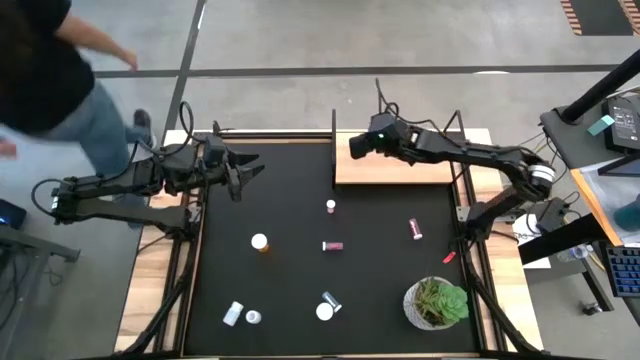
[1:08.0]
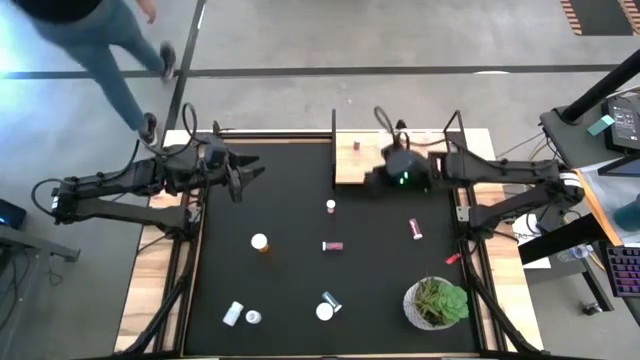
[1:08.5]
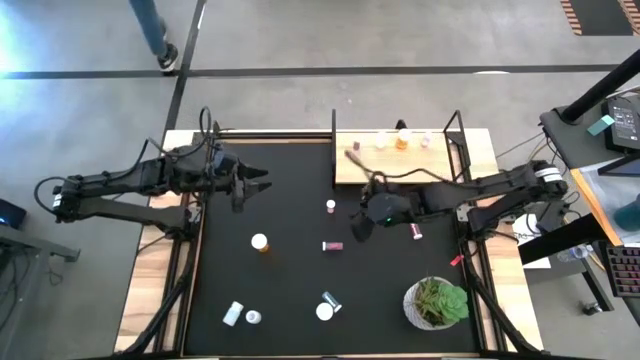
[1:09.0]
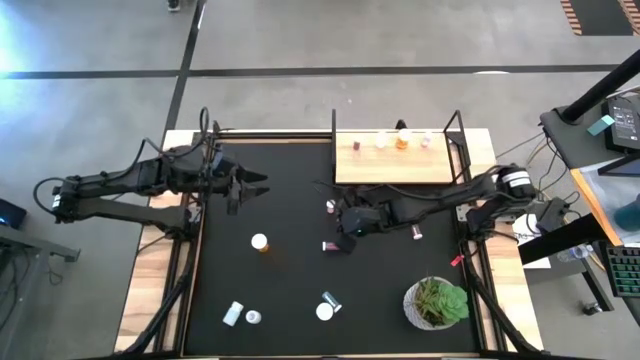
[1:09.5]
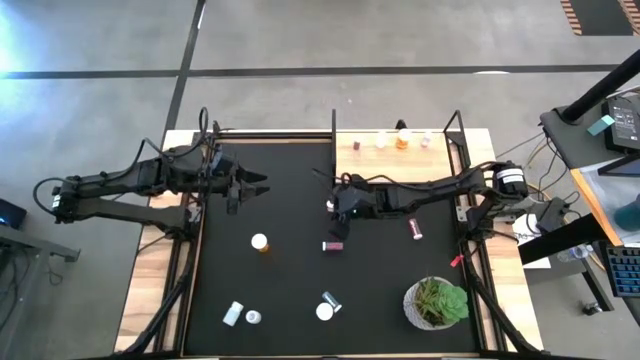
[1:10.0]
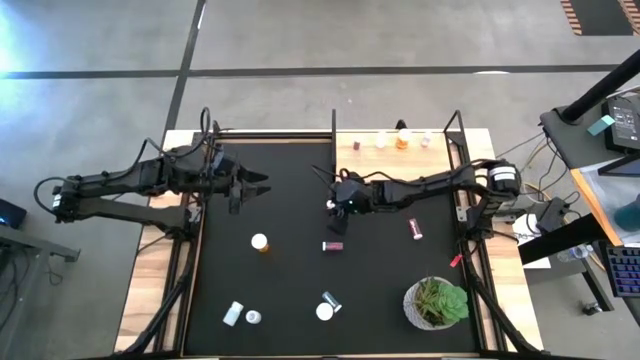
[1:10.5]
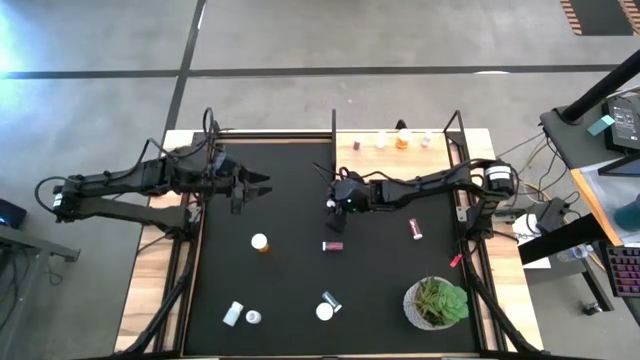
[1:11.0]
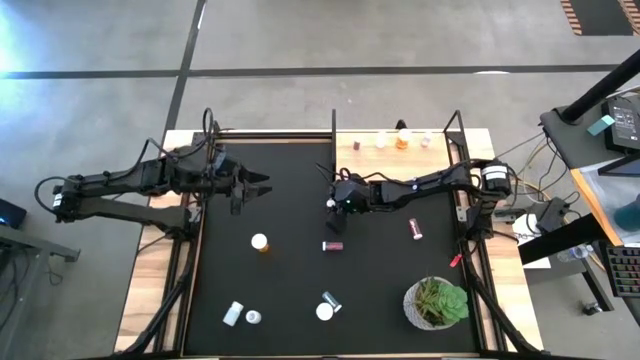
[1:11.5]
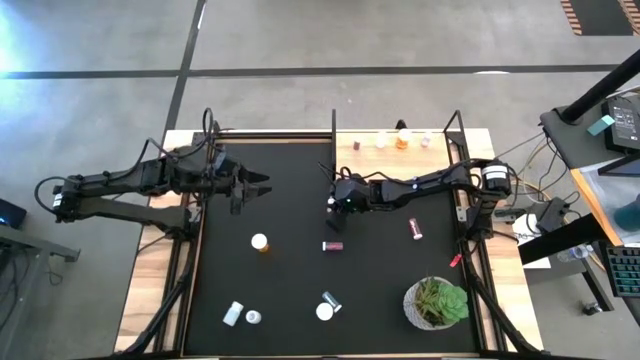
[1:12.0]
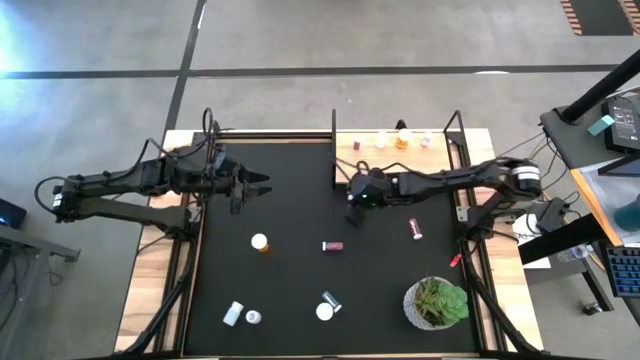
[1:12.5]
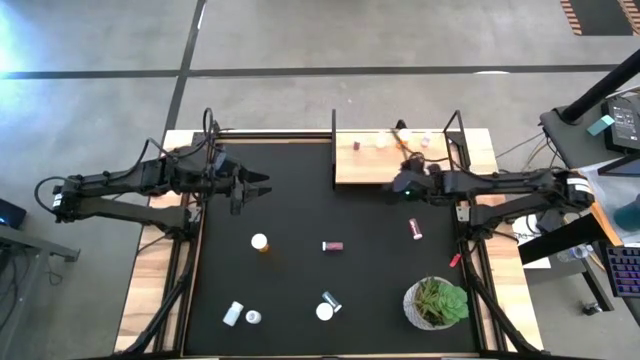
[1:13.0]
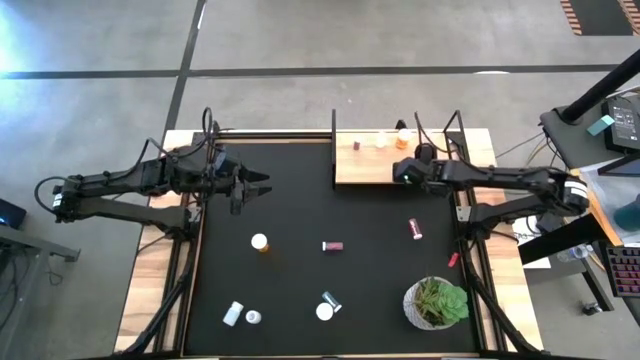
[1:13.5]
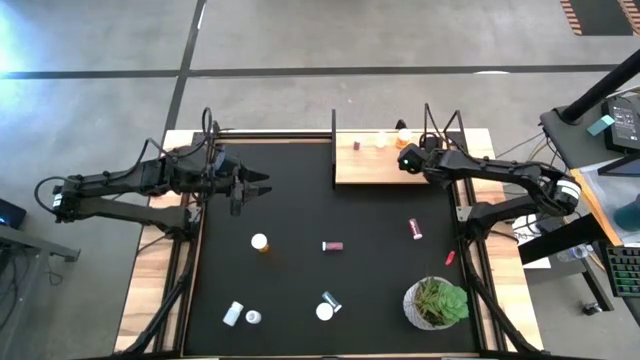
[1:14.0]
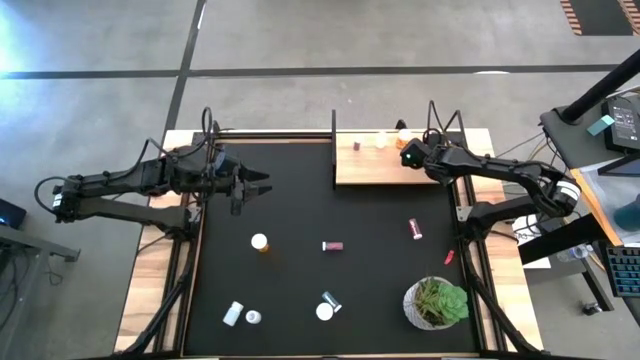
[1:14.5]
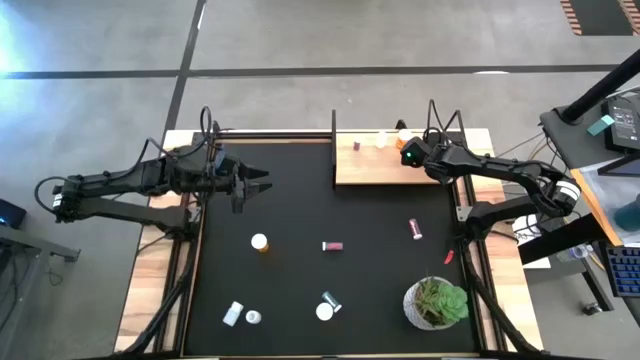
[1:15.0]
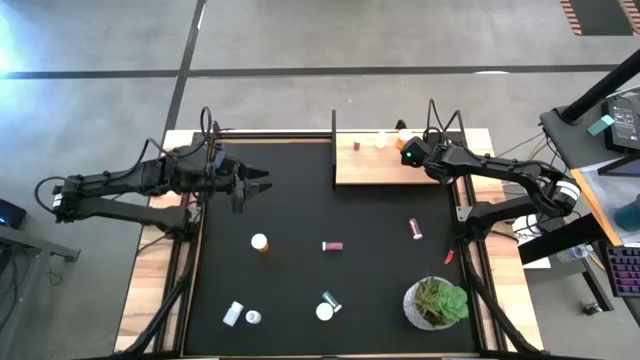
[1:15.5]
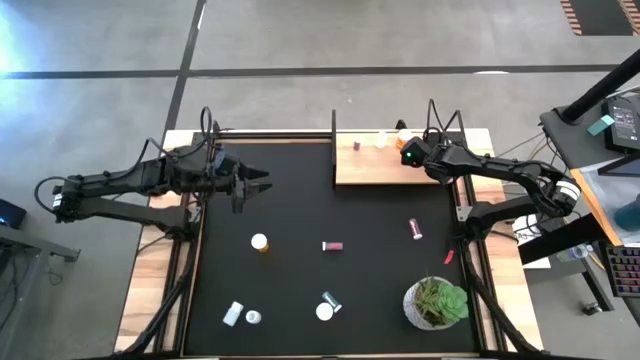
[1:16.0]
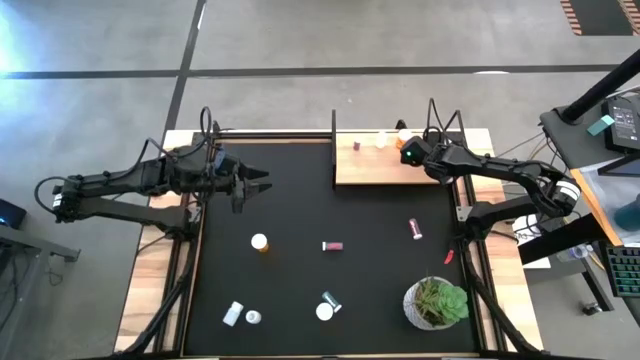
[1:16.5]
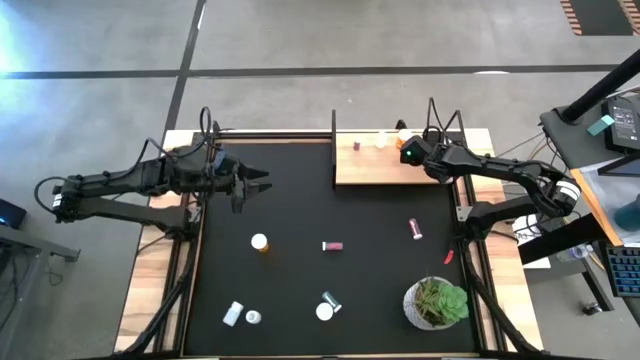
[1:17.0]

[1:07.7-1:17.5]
Task: Pick and place medicine bottles onto shelf by color
Put the left pink pill bottle on the shelf aligned with the other pink pill bottle

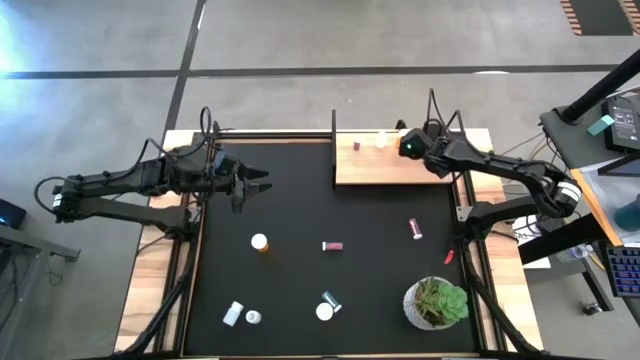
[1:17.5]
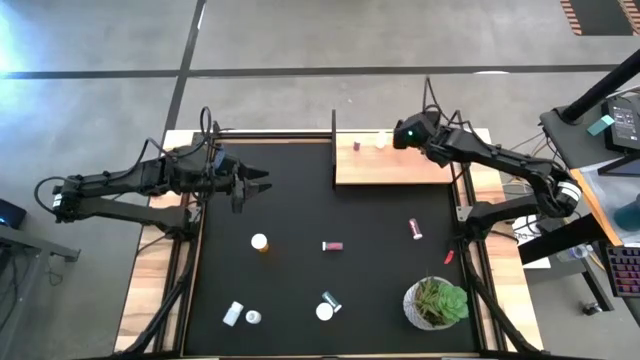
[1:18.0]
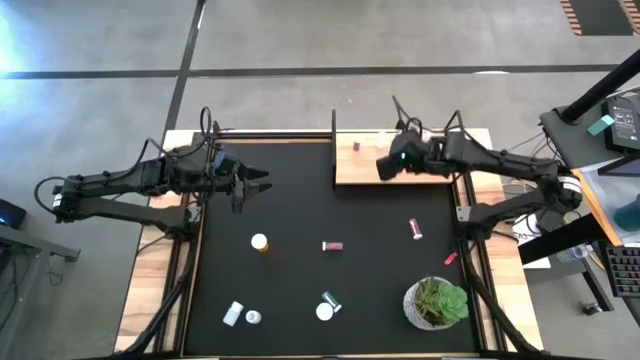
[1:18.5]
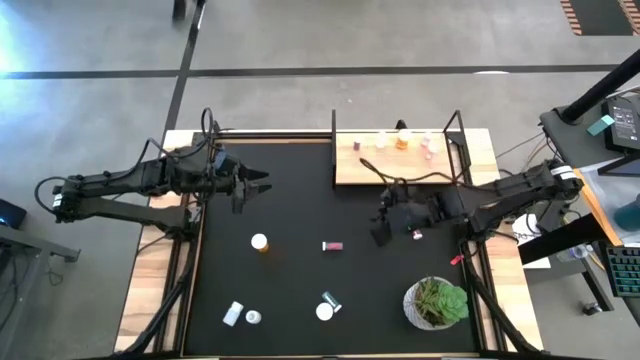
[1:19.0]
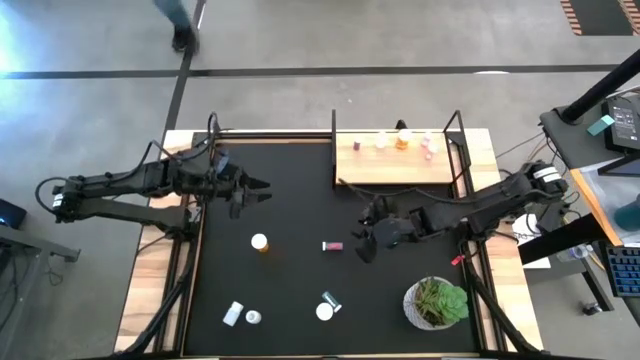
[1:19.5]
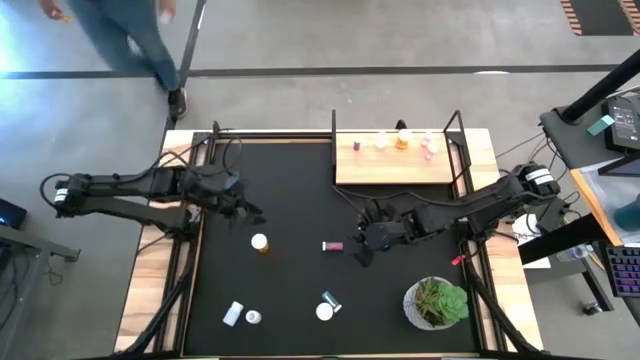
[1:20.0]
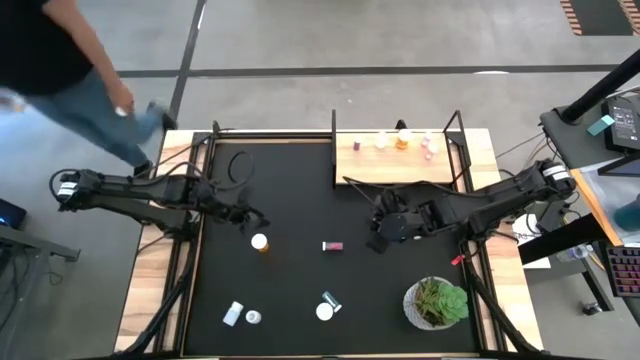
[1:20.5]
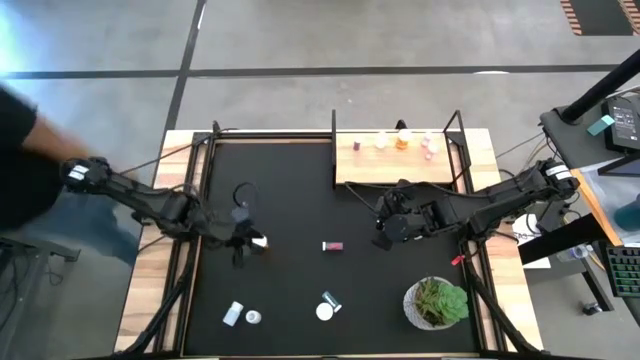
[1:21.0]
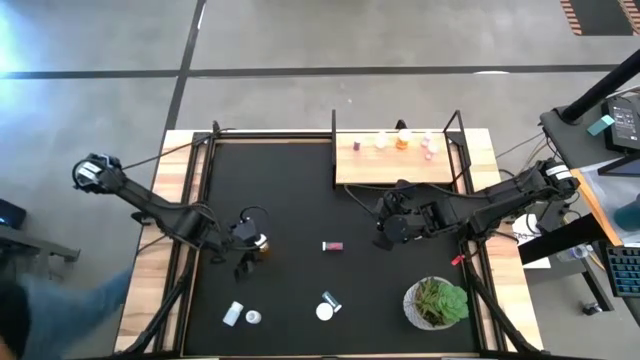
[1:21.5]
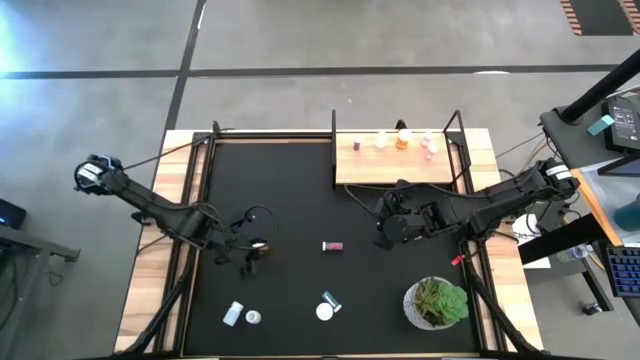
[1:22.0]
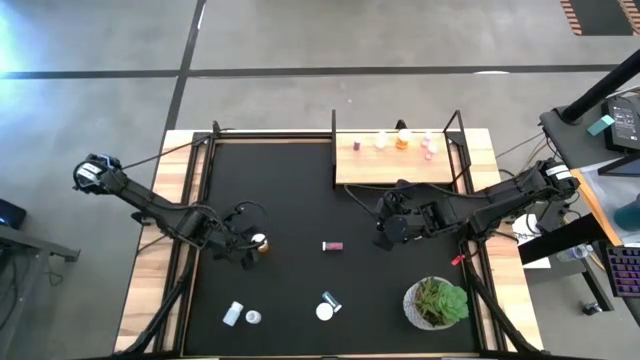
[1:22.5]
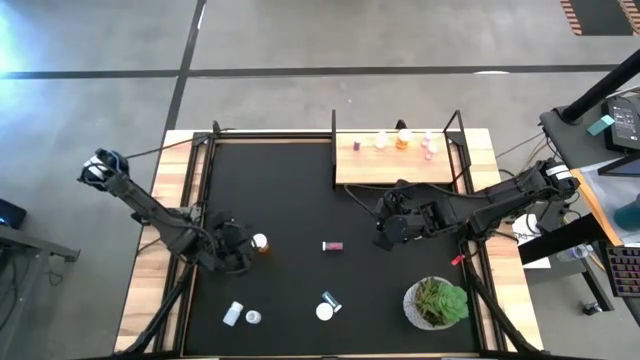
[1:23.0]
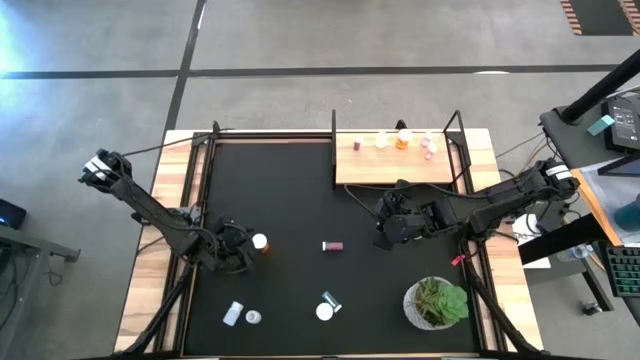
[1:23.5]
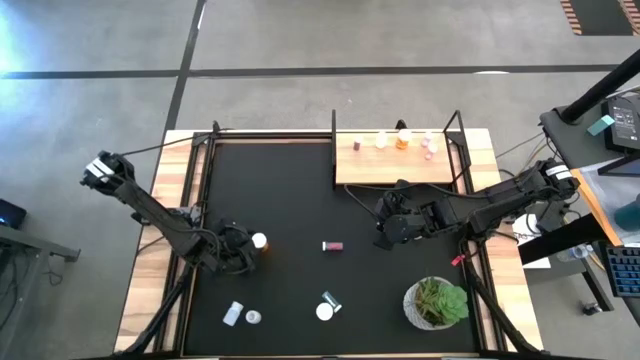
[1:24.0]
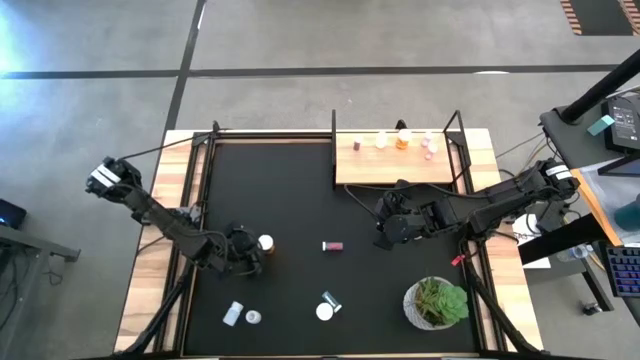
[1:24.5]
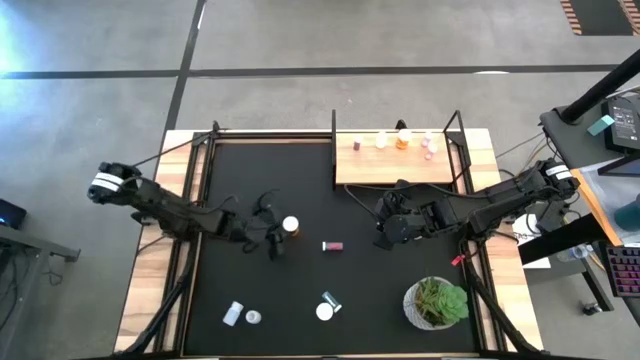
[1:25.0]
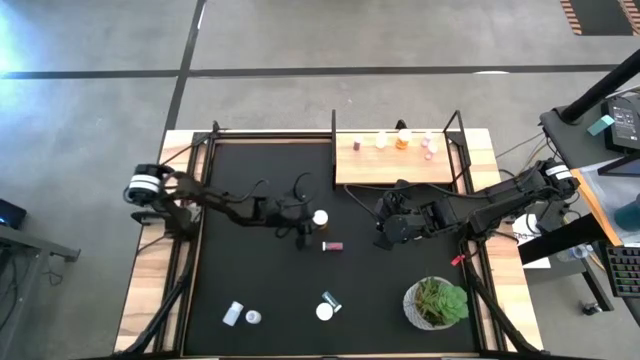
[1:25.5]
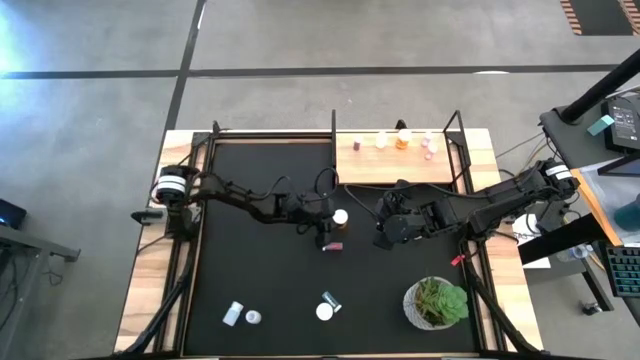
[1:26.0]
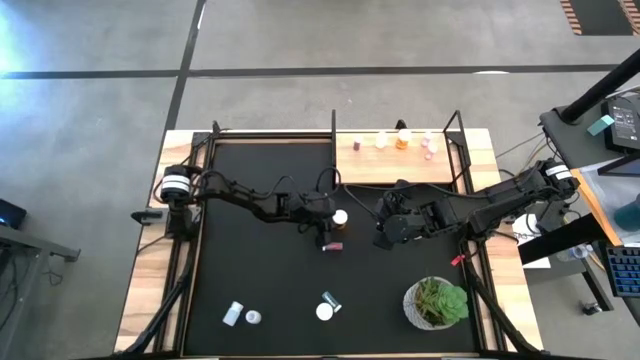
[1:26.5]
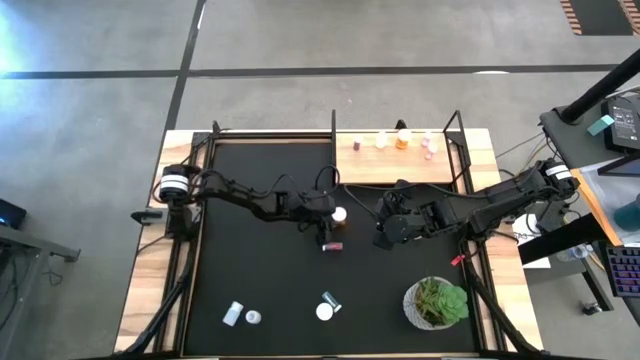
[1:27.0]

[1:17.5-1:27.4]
Move the top orange pill bottle to the center of the table

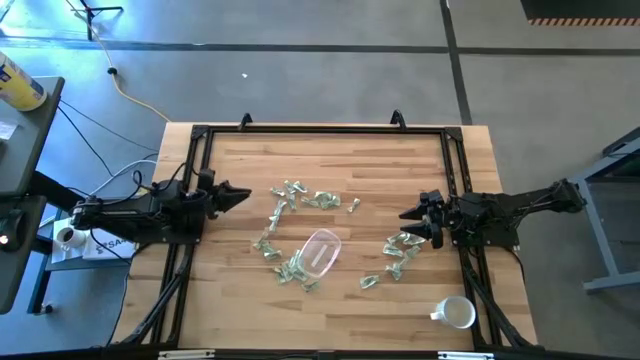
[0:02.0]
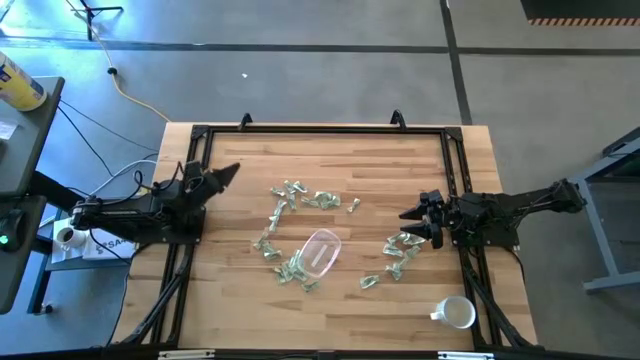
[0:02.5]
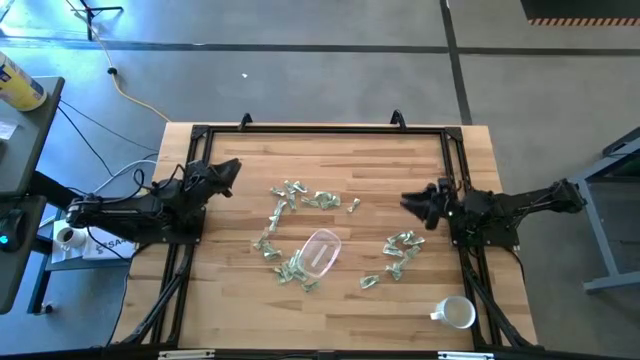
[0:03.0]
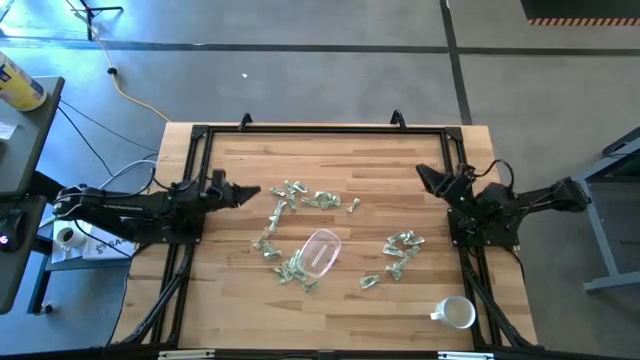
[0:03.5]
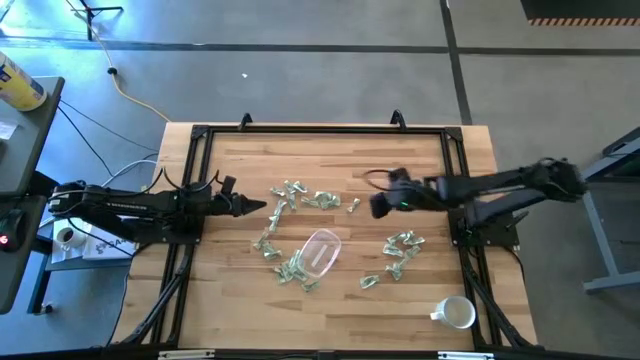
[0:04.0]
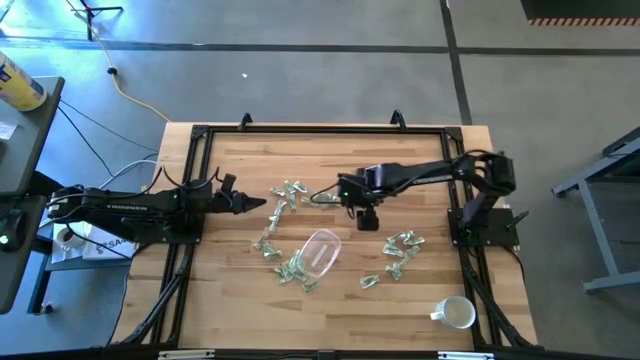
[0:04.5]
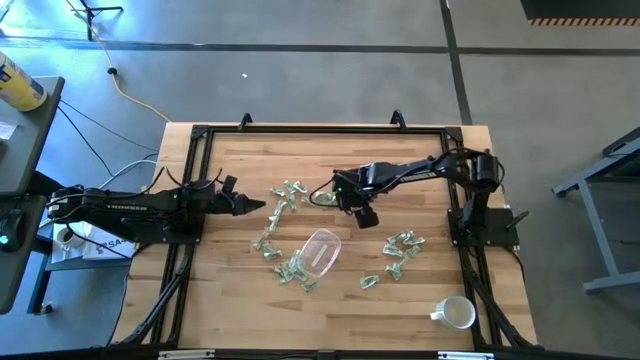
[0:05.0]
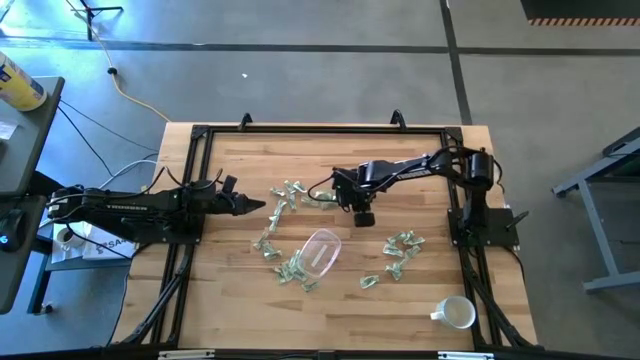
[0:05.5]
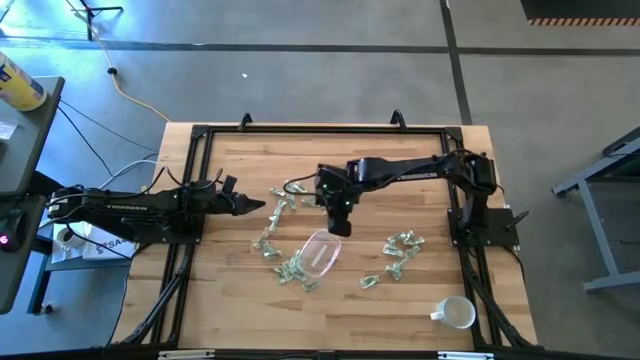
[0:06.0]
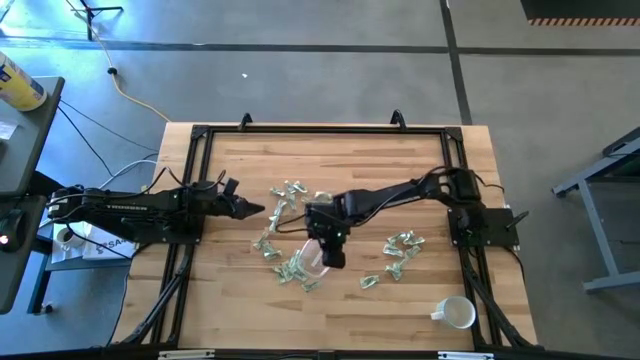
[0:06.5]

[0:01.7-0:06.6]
Task: Pick and place Stevia / Truvia into bins
Put the stevia packet into the transparent bin
